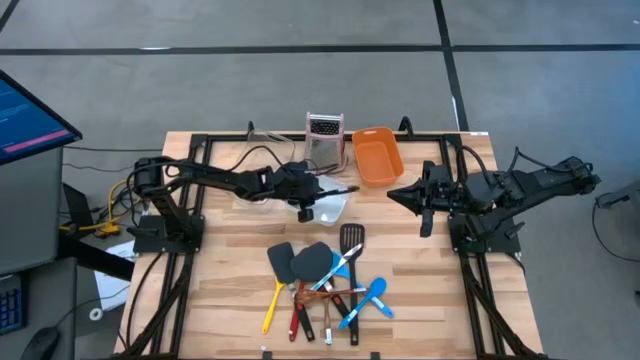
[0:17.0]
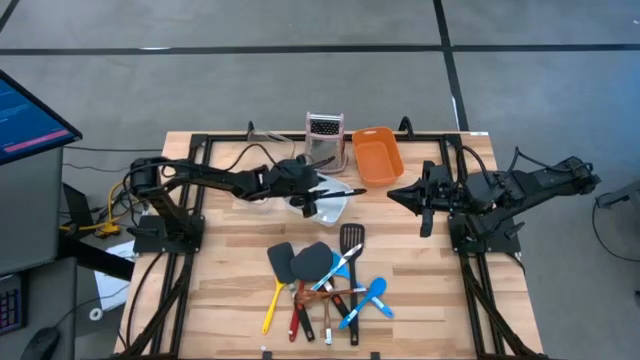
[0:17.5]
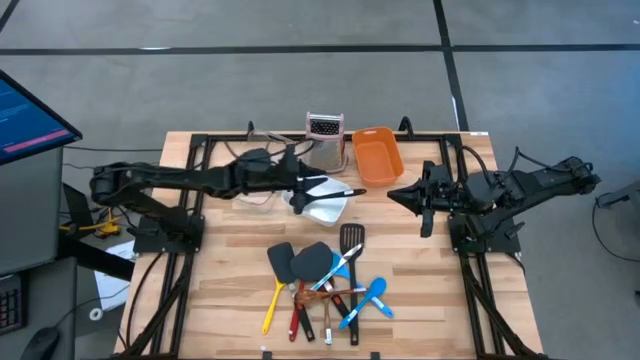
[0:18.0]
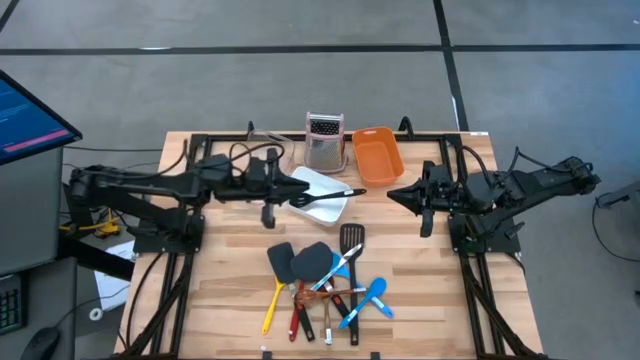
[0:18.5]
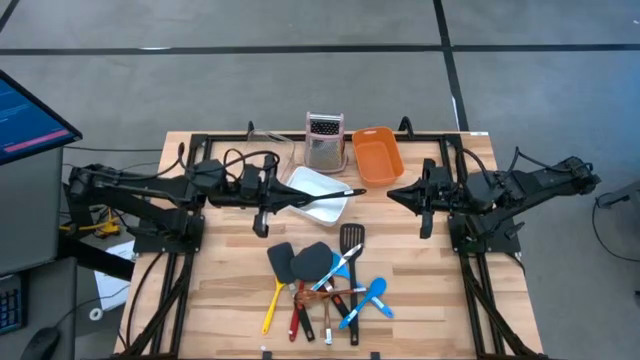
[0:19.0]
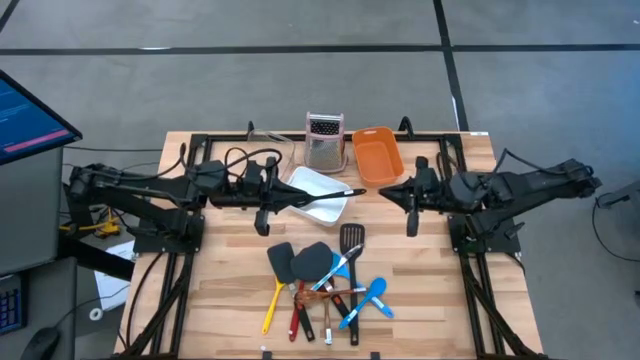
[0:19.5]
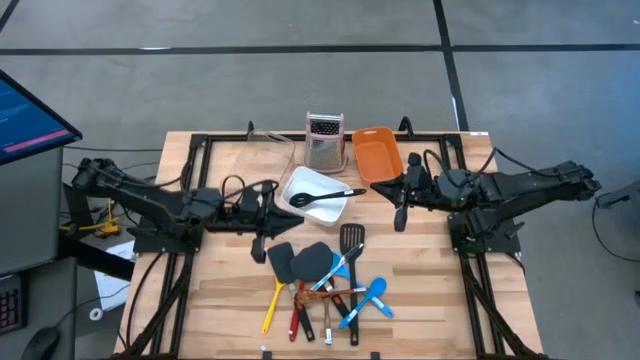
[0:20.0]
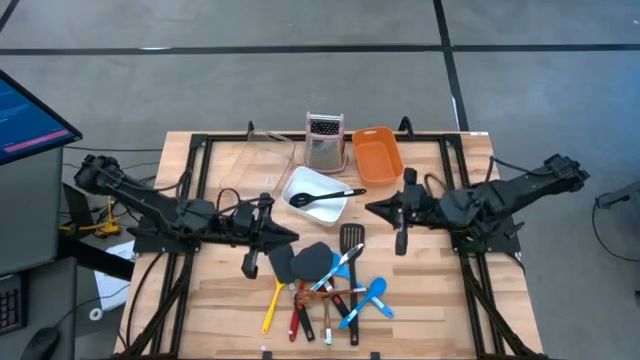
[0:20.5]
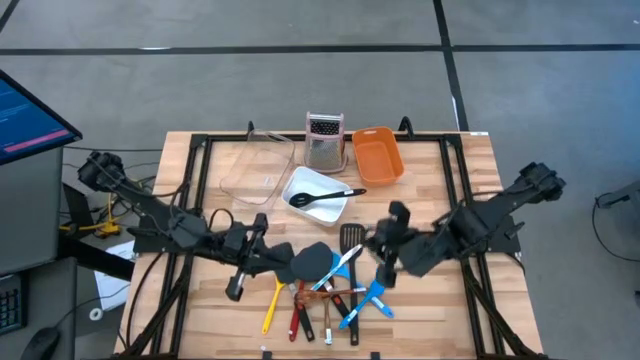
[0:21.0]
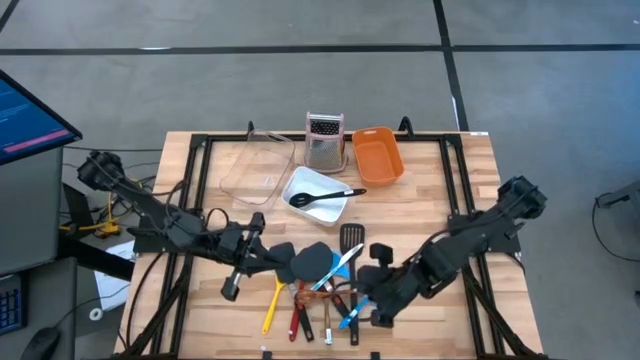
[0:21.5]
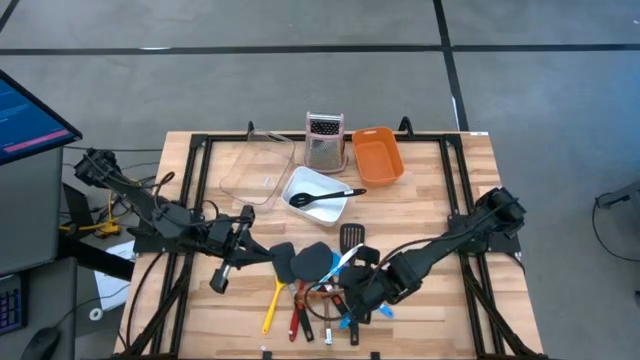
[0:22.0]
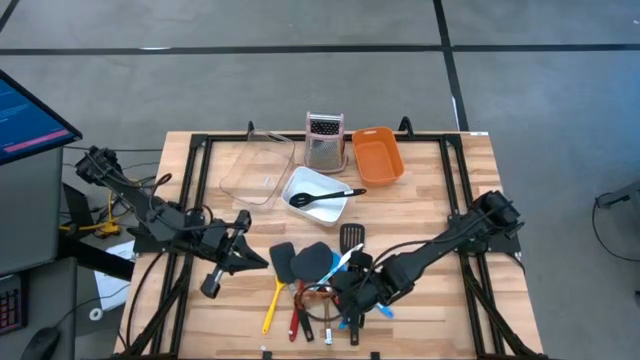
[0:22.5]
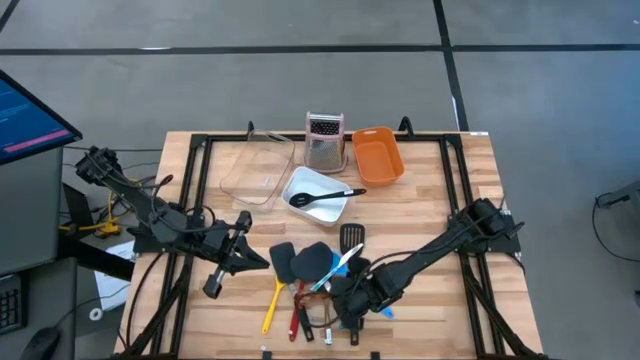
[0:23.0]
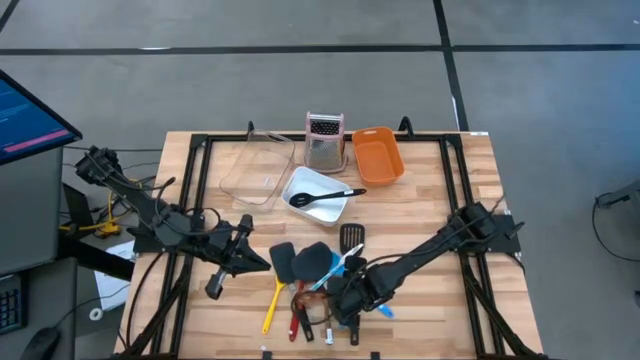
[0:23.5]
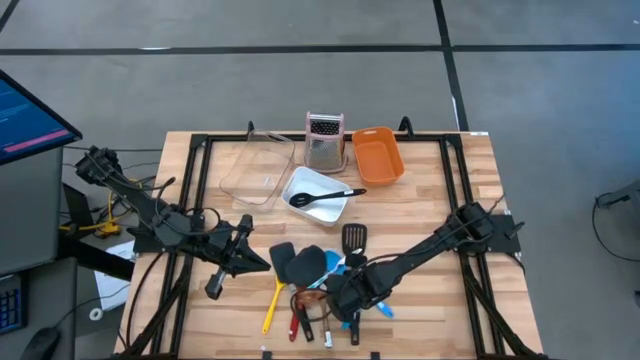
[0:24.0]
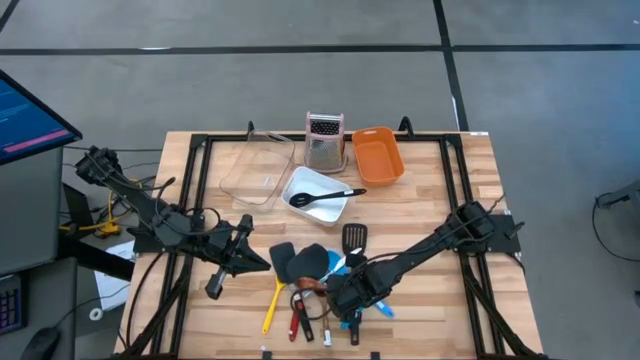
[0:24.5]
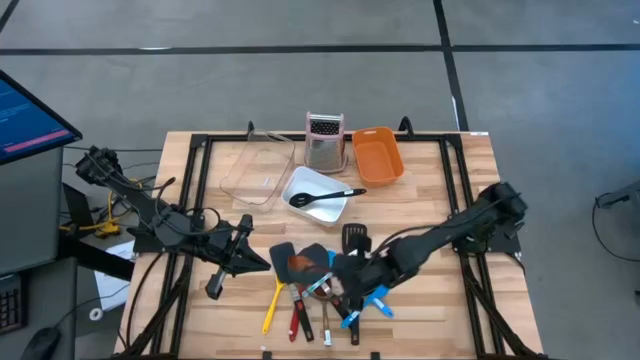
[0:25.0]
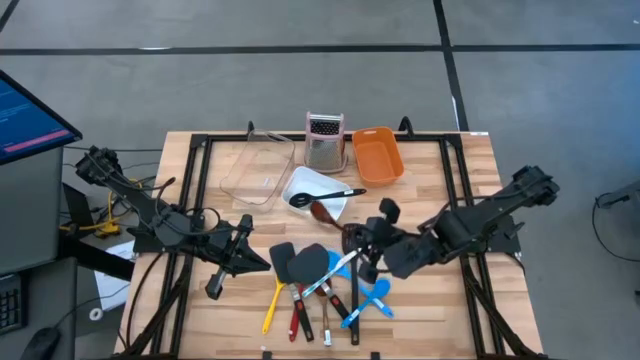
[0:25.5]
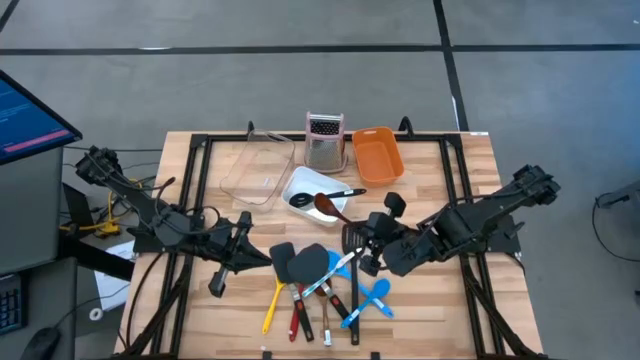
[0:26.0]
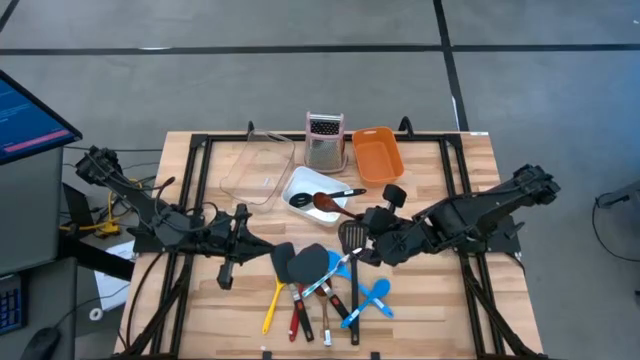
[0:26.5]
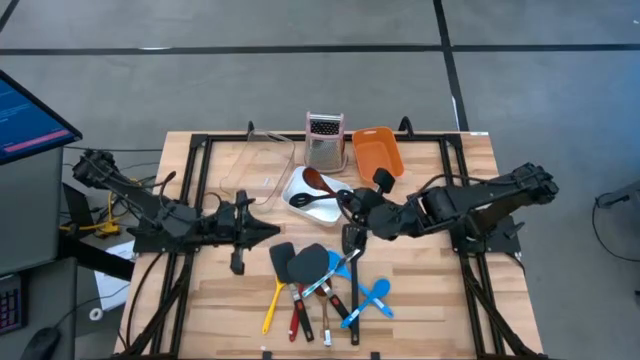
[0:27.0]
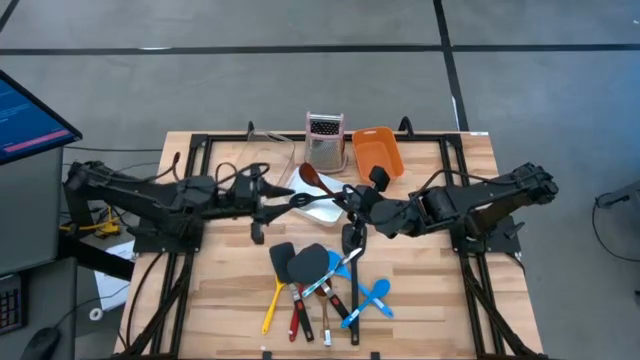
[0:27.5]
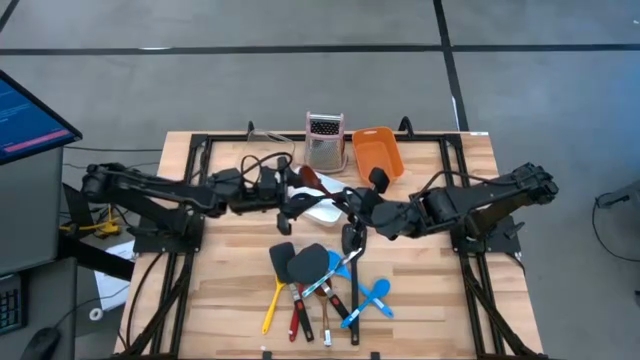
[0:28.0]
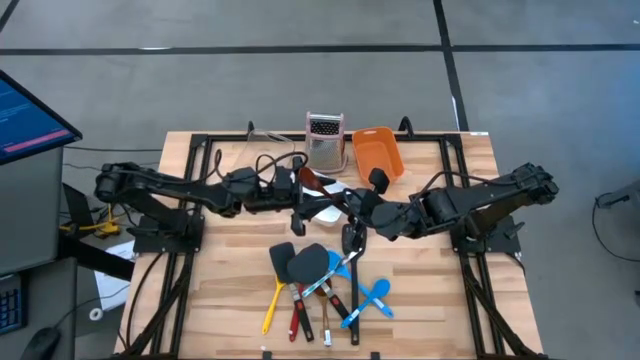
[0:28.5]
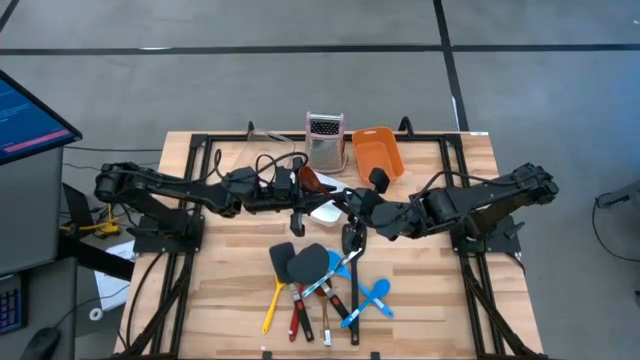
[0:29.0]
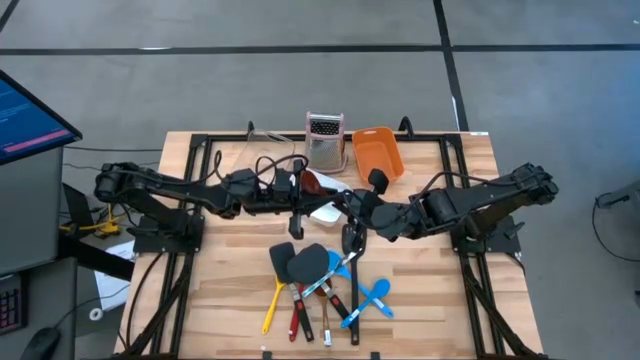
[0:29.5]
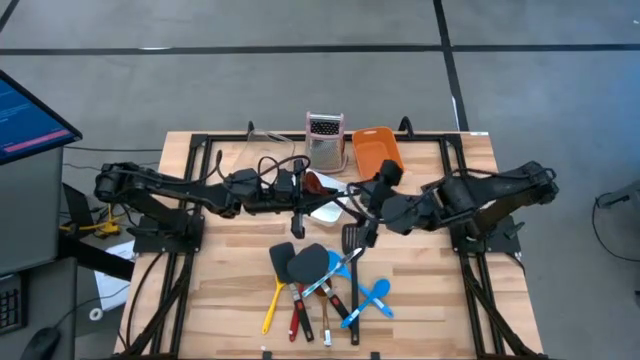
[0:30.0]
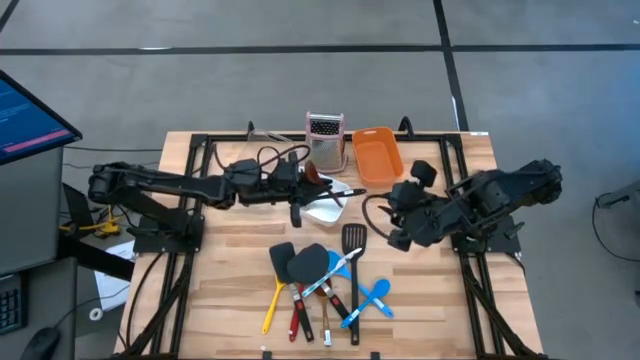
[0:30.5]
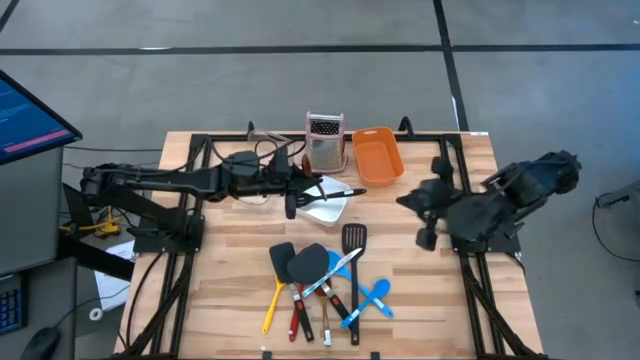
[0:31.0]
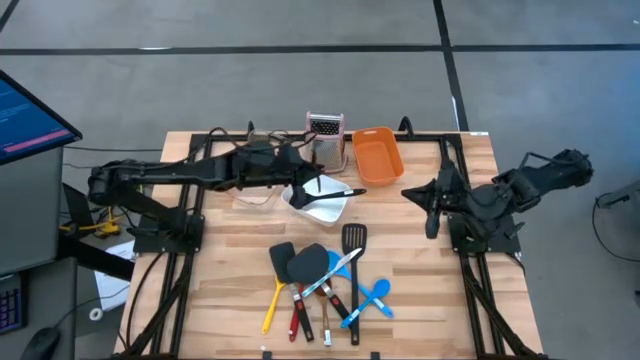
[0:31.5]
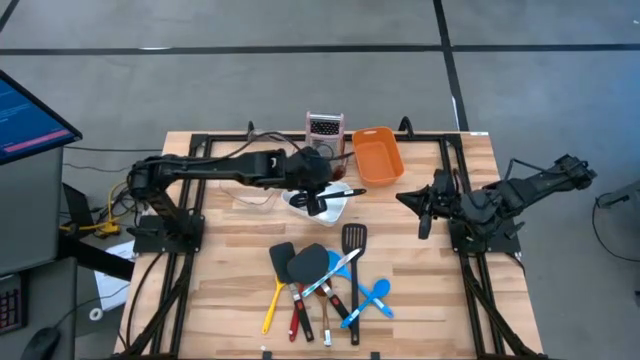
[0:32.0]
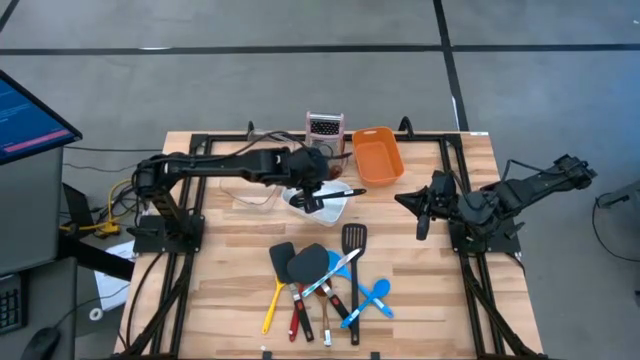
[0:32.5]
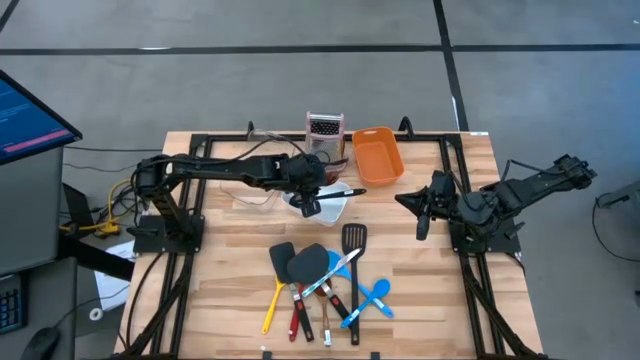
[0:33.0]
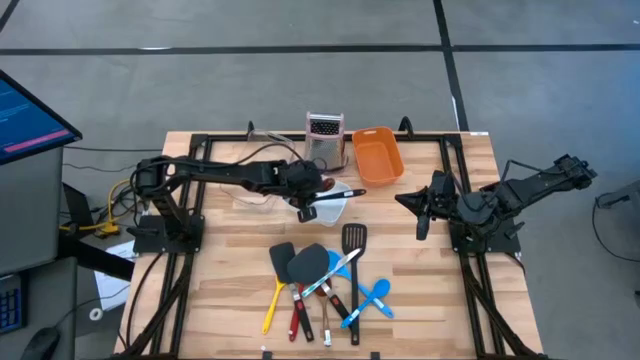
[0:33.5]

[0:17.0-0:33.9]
Task: Pick & Place Kitchen Items
Put the wooden spoon into the white bin

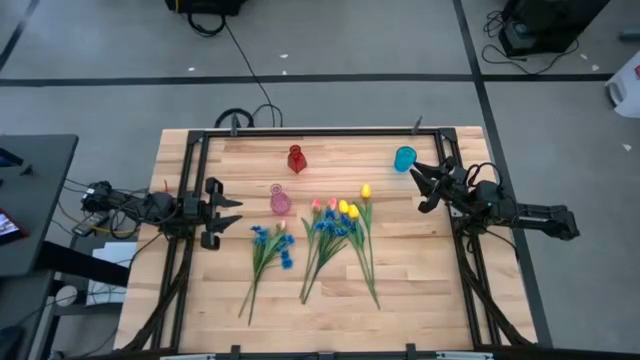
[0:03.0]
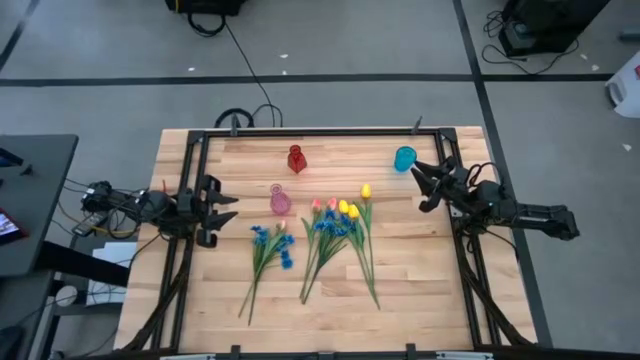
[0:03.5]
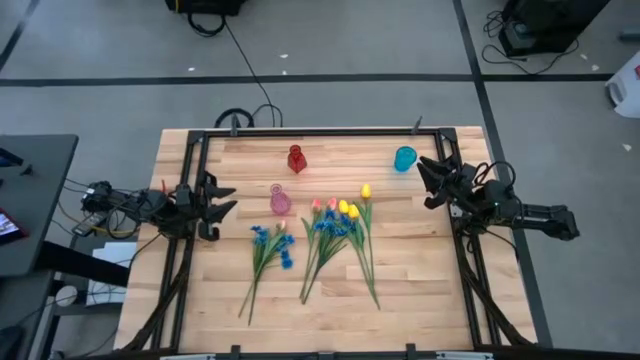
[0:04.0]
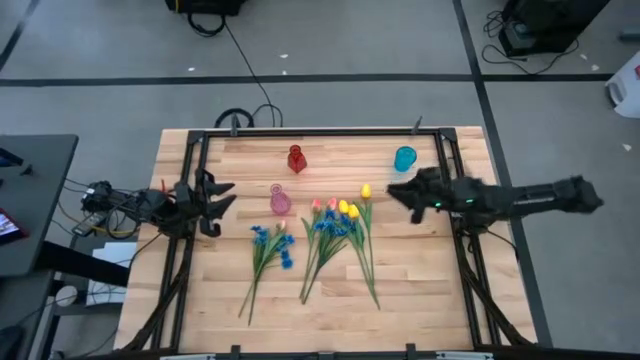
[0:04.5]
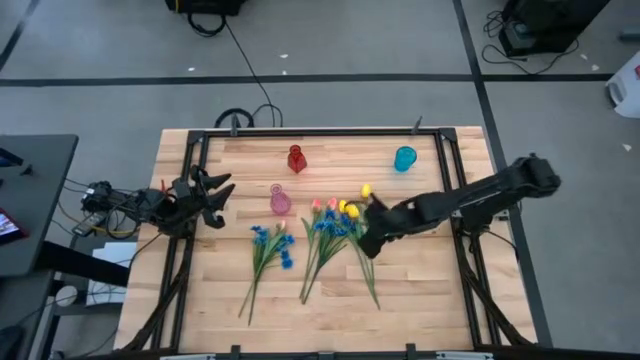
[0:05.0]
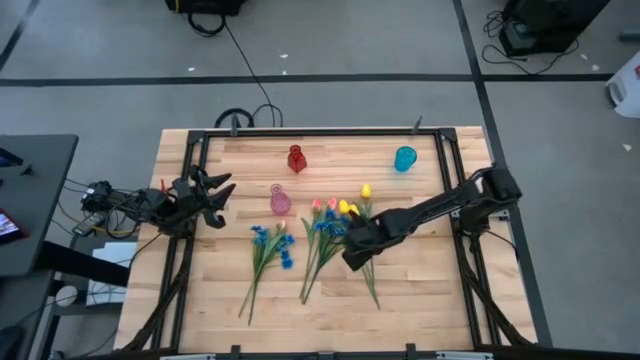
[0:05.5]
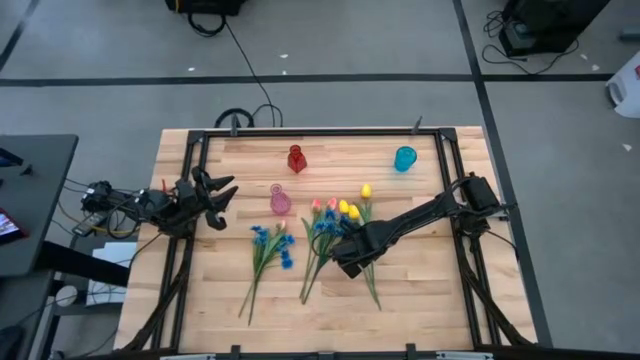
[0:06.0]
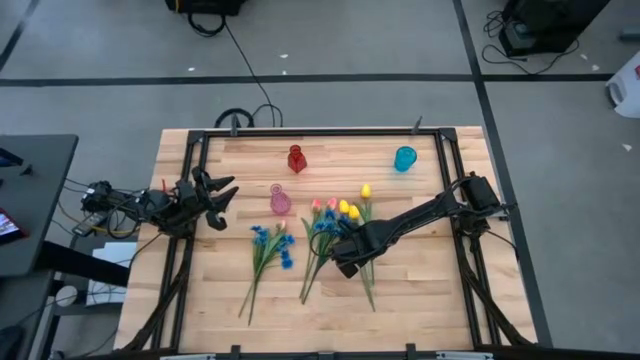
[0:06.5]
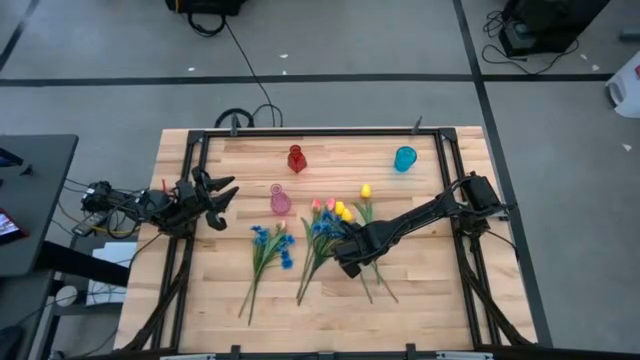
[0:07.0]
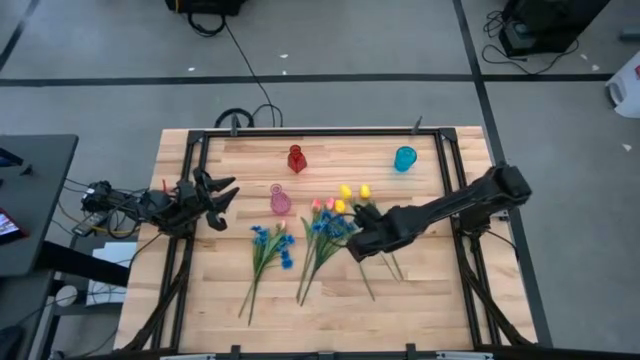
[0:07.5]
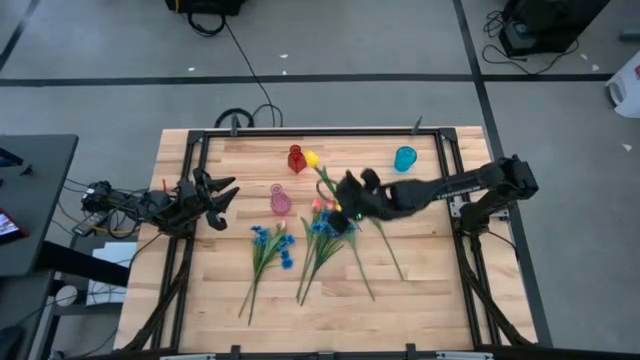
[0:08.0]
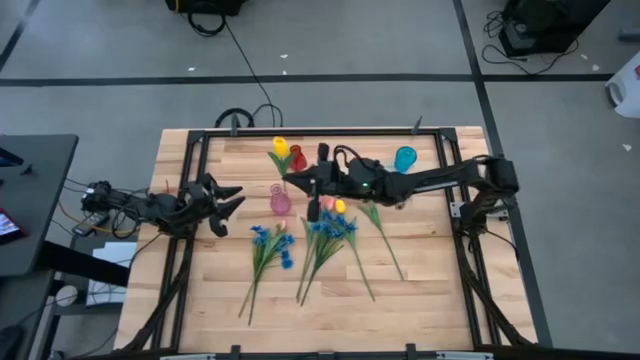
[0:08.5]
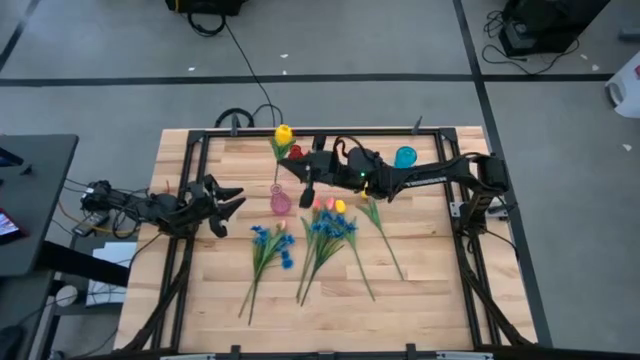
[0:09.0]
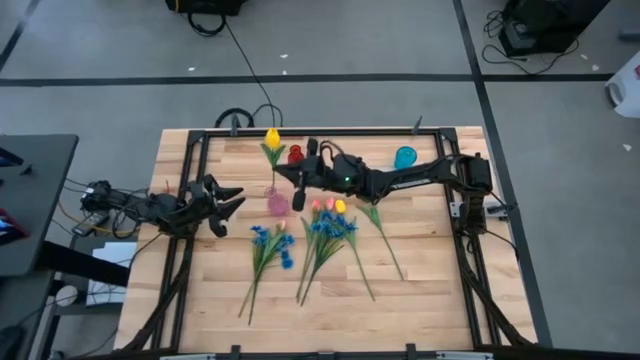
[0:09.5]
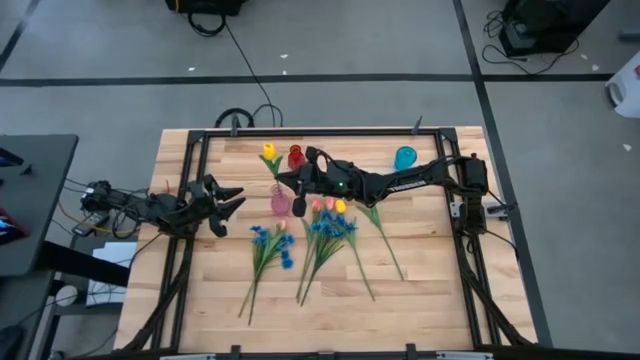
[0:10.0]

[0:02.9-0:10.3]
Task: Sort flowers into vase by color
Put the center yellow tulip into the pink vase
